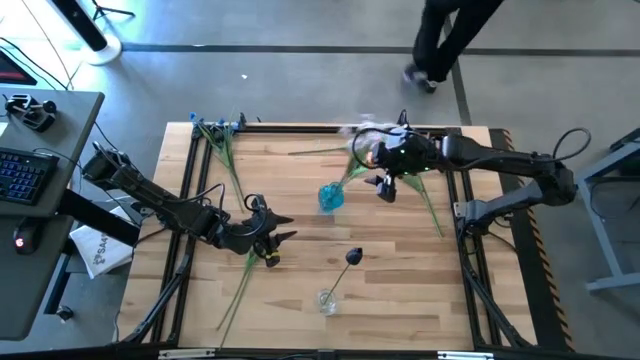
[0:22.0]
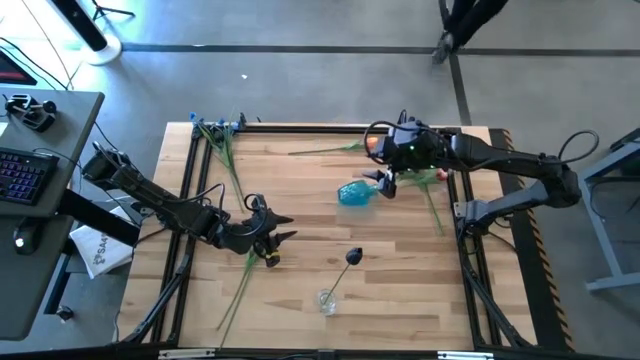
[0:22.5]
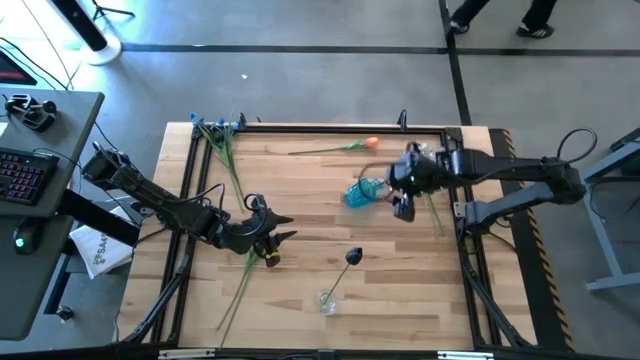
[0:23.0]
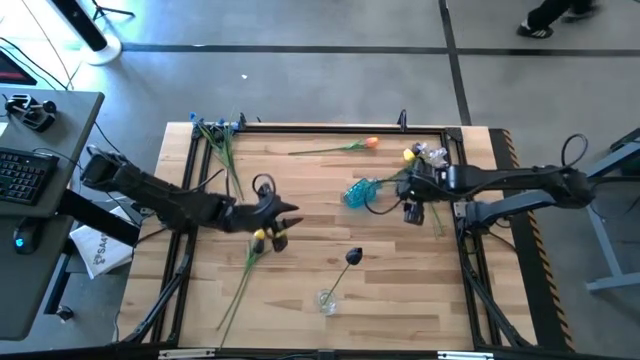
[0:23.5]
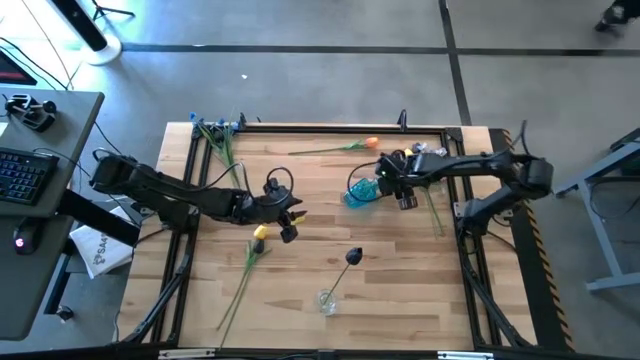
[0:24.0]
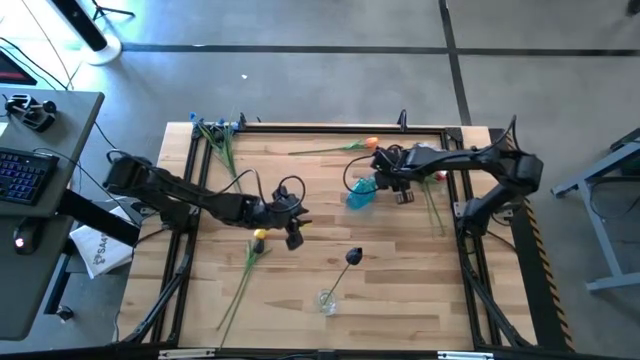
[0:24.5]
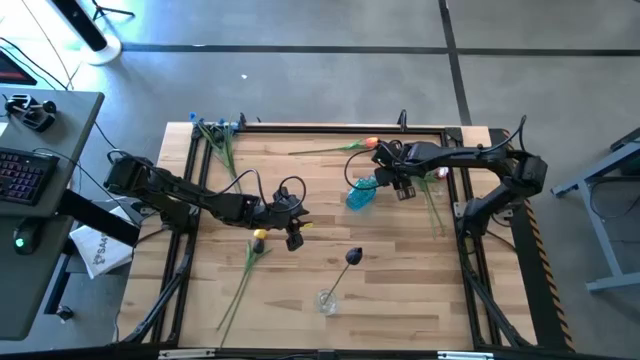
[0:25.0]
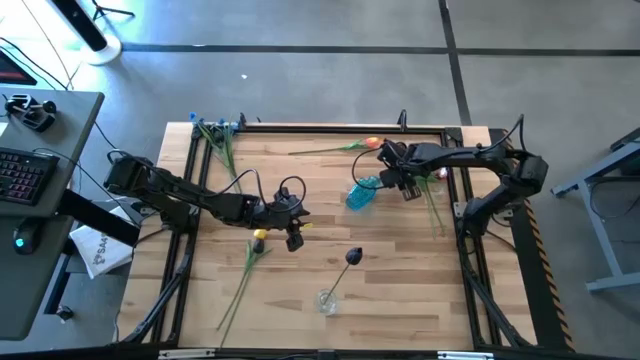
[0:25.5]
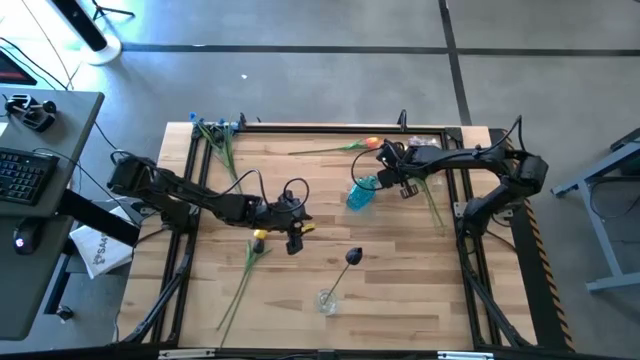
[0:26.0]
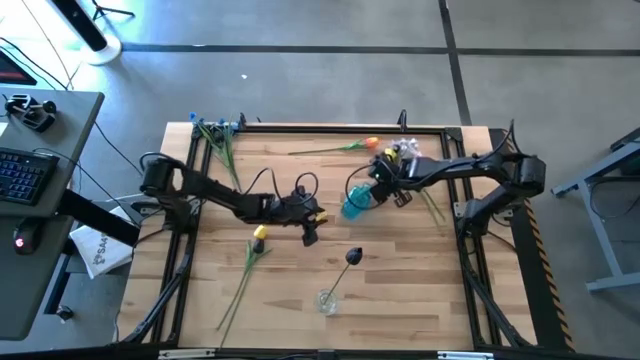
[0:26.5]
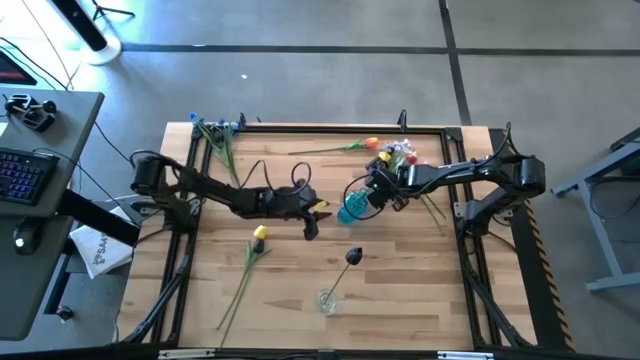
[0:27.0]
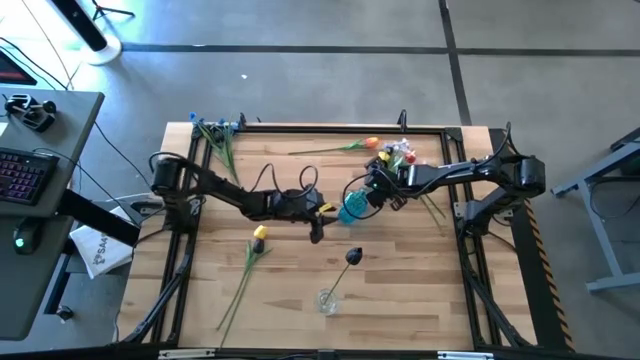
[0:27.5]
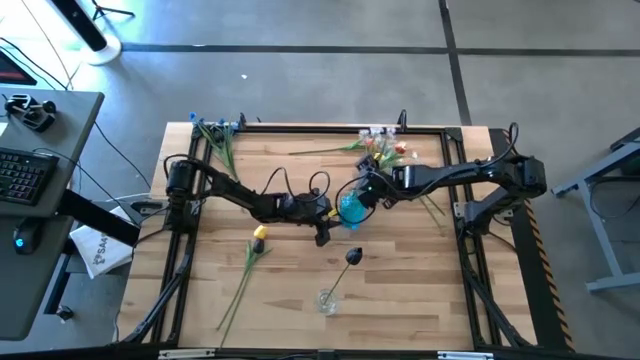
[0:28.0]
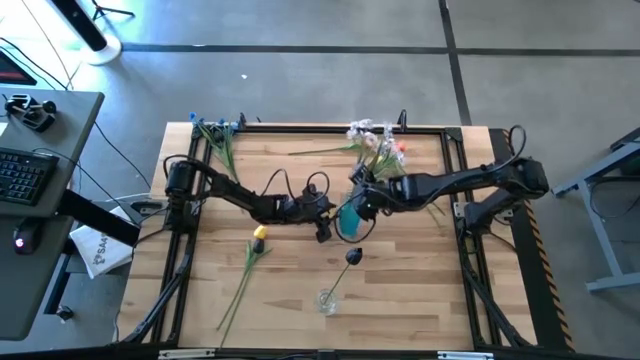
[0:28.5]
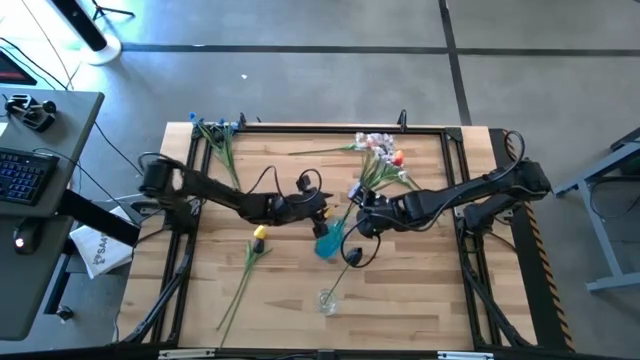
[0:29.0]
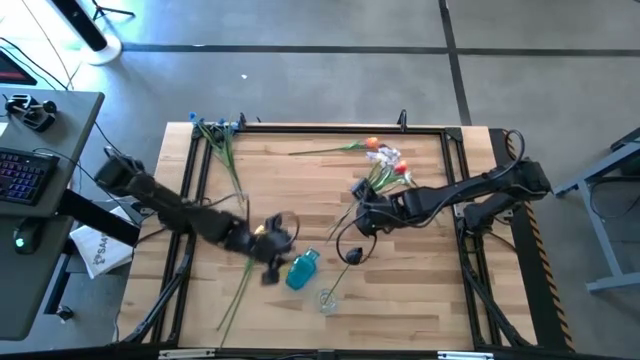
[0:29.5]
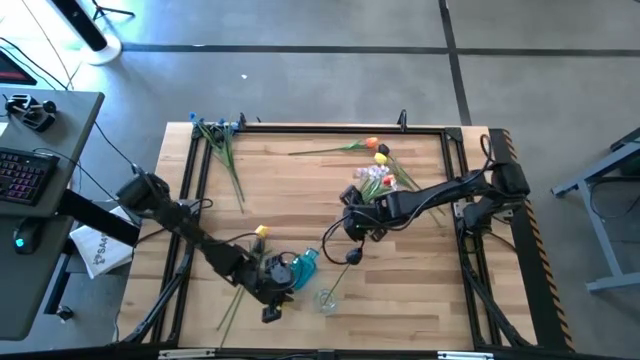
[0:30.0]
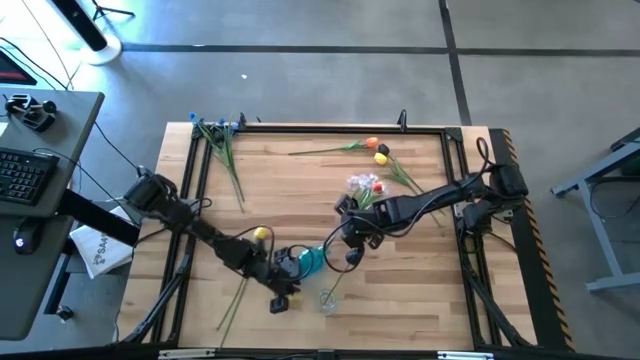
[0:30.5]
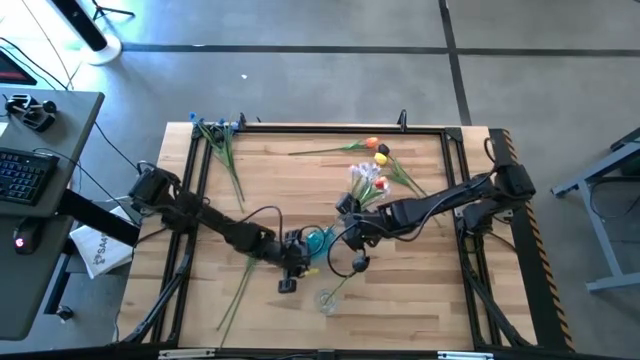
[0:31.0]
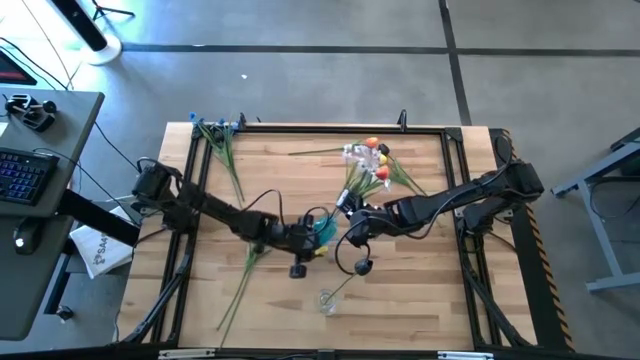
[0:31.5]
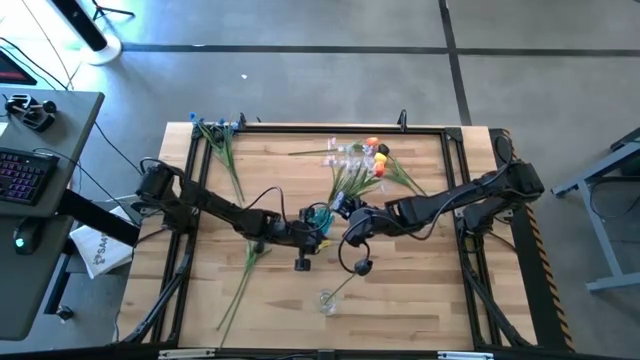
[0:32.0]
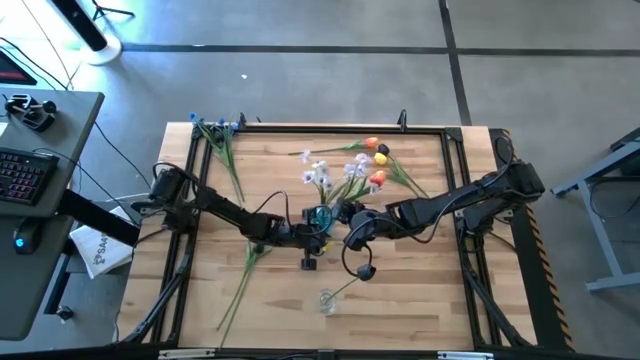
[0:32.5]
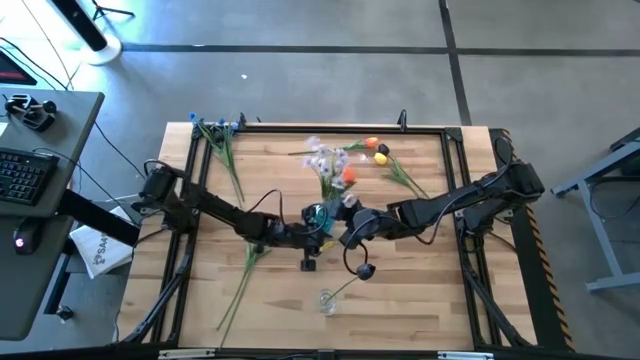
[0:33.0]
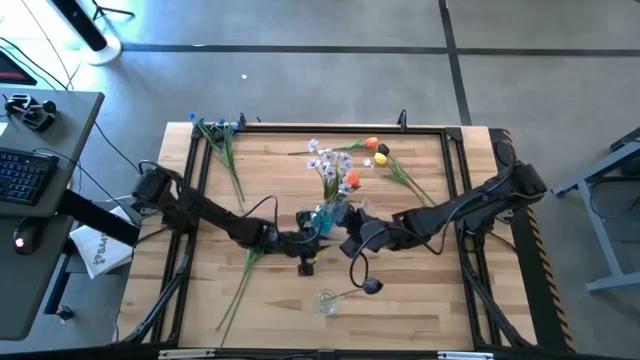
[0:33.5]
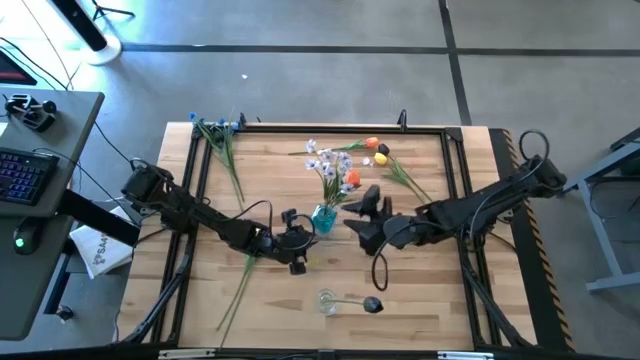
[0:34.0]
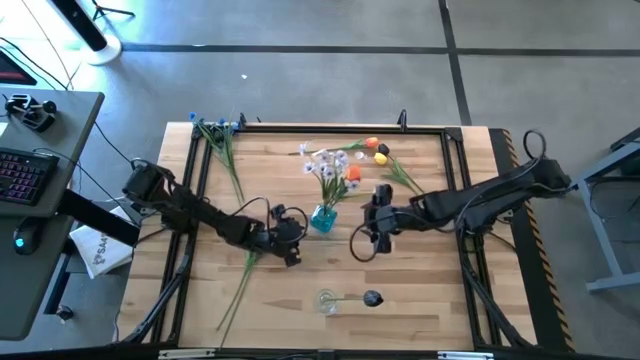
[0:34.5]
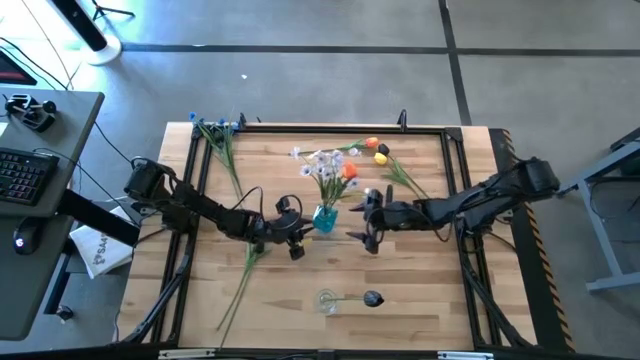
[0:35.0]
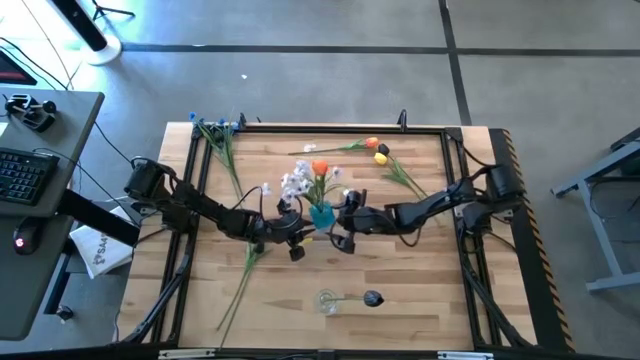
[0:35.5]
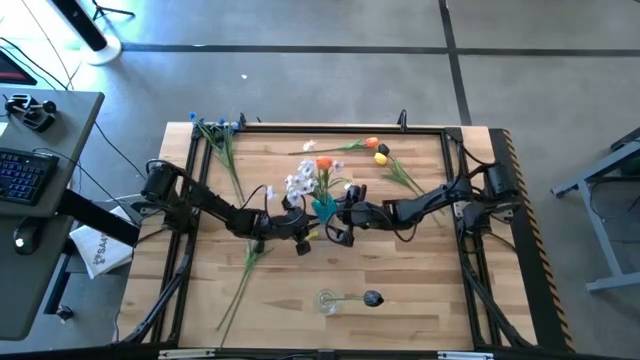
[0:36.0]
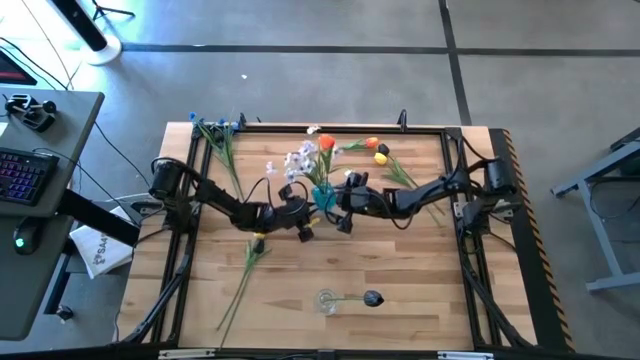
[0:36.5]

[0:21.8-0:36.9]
Task: Sort flowers into vase by color
Adjust the blue vase

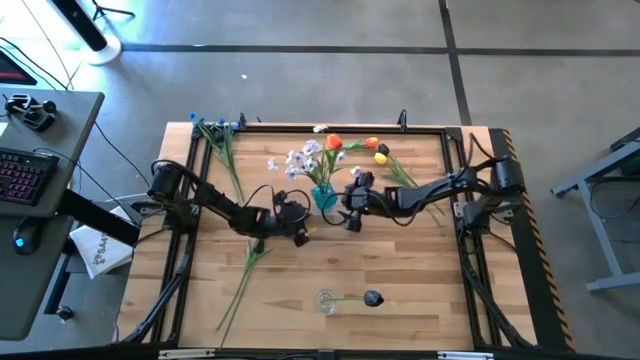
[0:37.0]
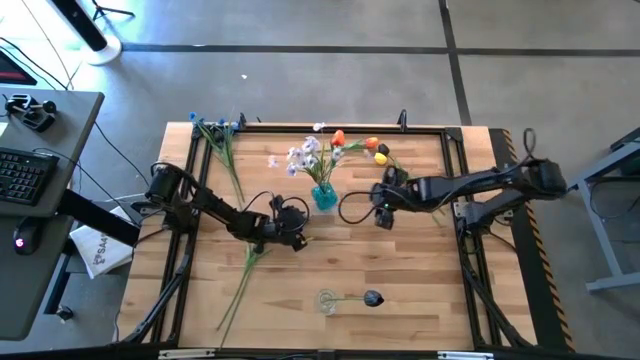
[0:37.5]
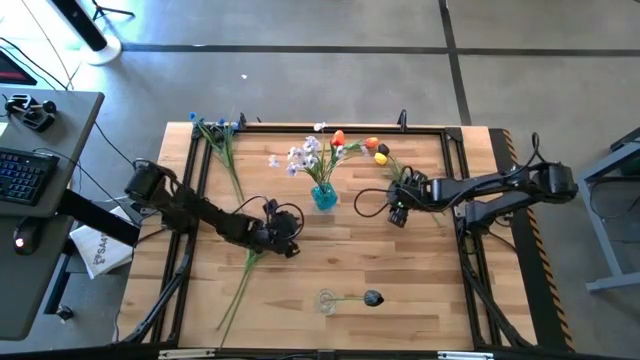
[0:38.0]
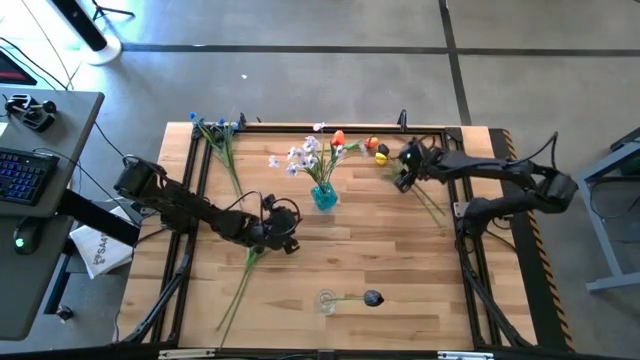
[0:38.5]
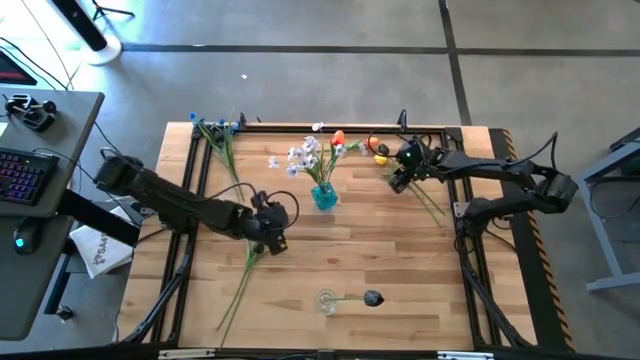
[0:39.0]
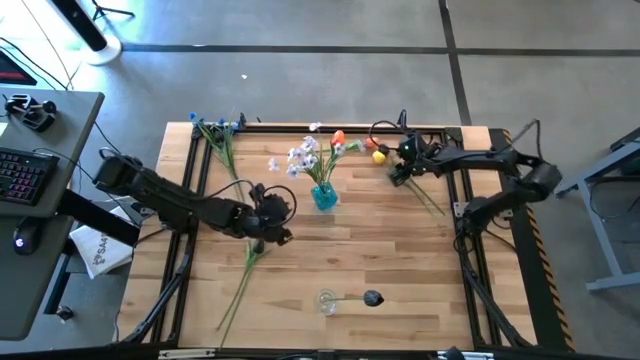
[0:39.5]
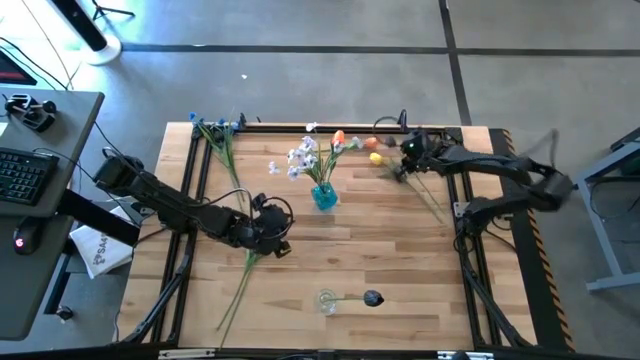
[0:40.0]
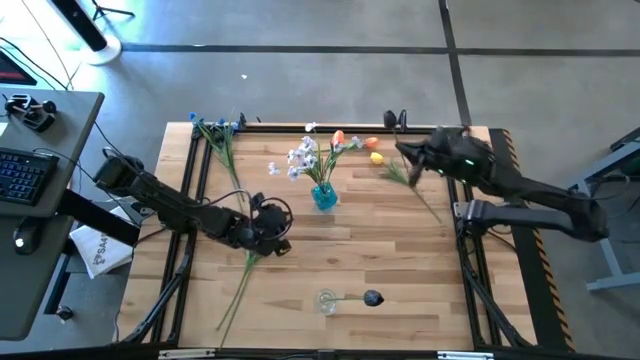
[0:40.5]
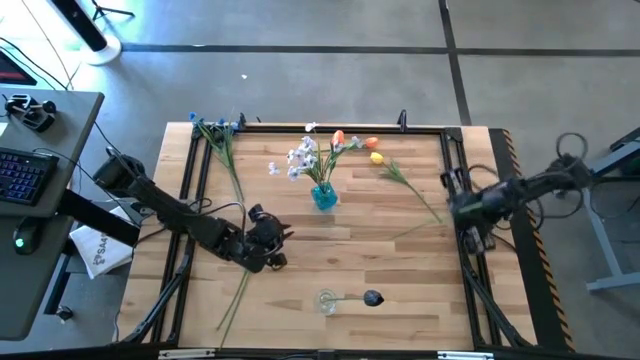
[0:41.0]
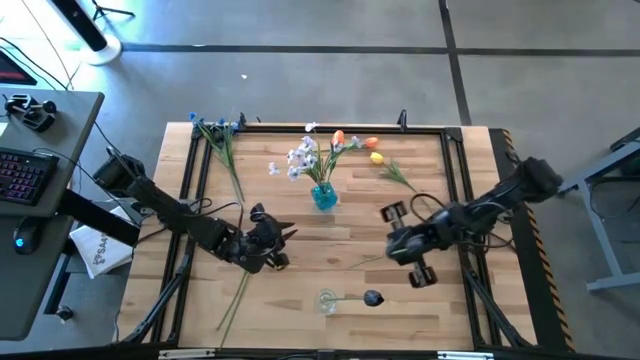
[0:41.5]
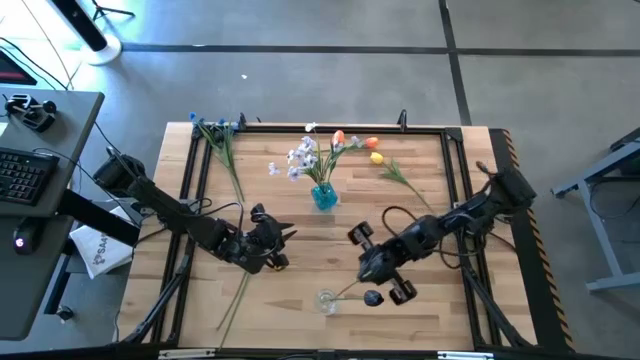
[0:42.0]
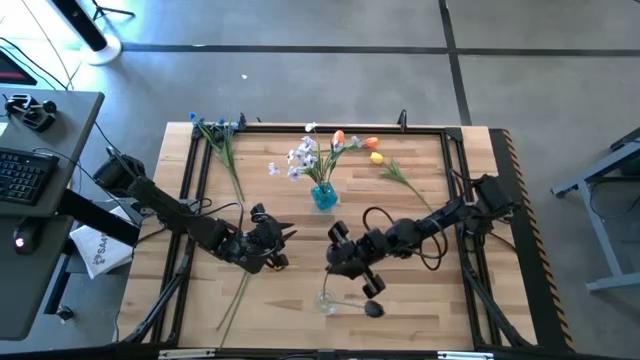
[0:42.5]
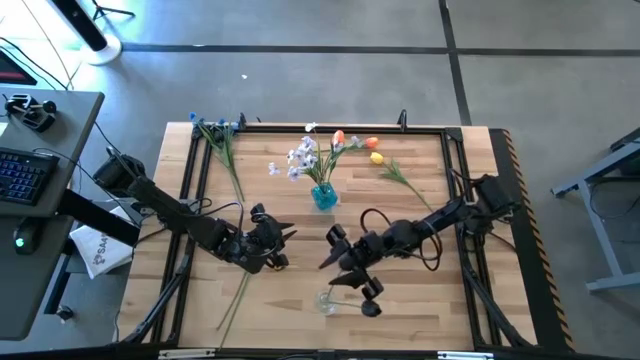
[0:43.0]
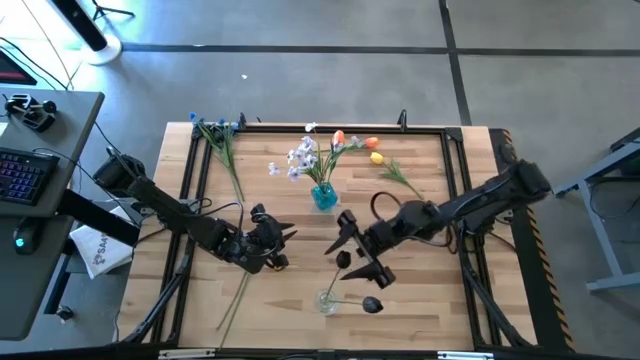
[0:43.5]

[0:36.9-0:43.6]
Put the top right black tulip into the transparent vase

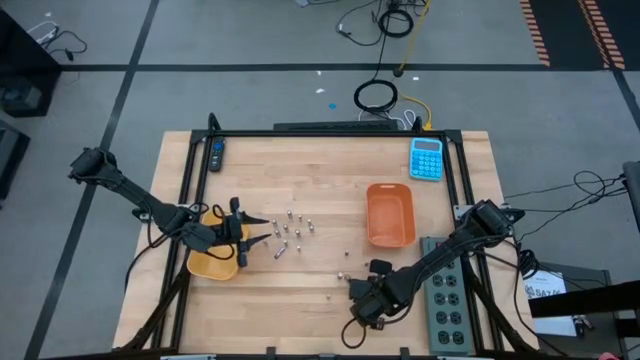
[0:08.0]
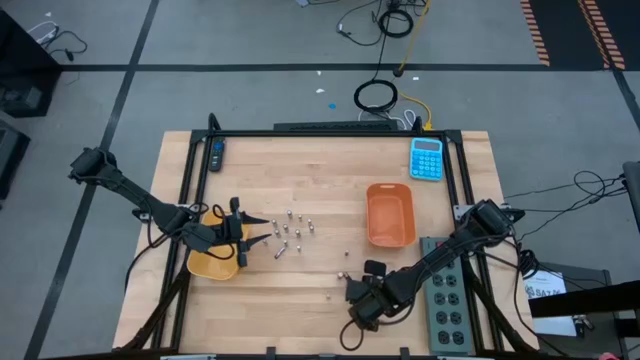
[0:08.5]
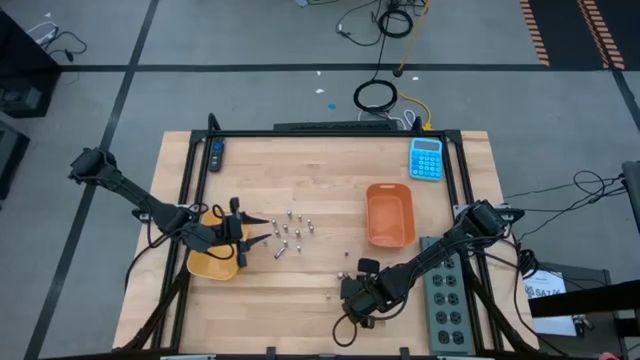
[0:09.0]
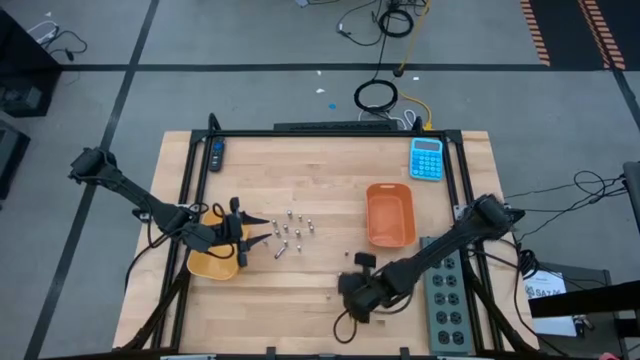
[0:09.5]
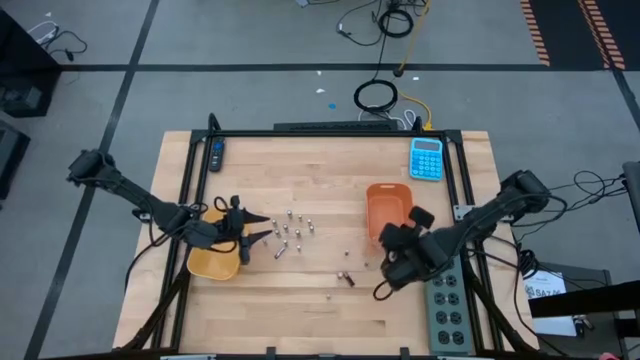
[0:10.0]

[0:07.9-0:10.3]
Task: Sort batteries
Put the black-brown battery into the orange bin
